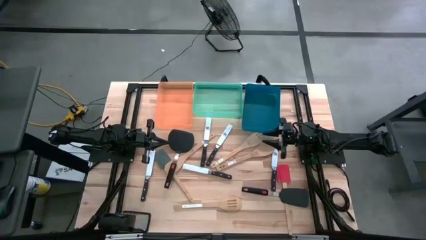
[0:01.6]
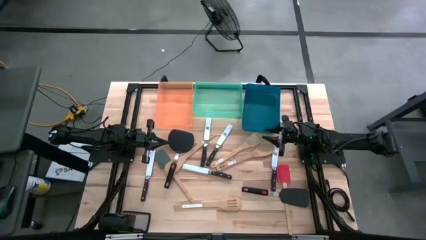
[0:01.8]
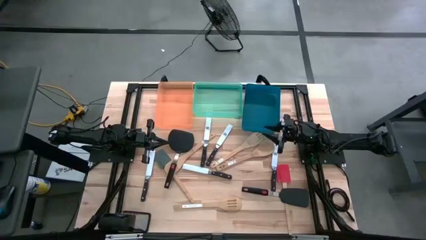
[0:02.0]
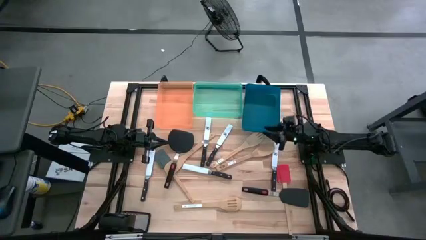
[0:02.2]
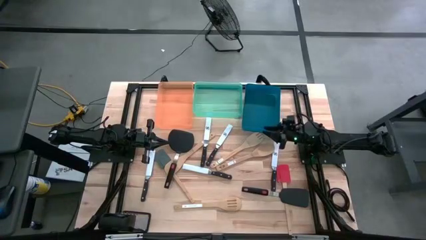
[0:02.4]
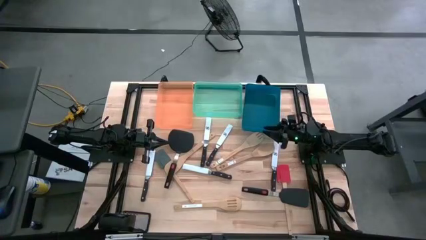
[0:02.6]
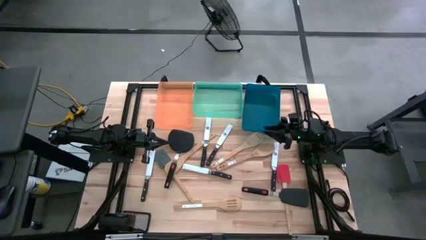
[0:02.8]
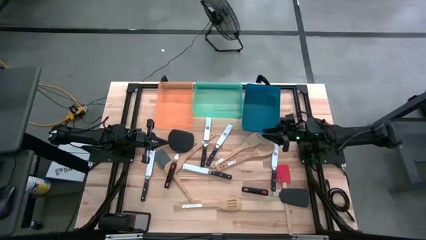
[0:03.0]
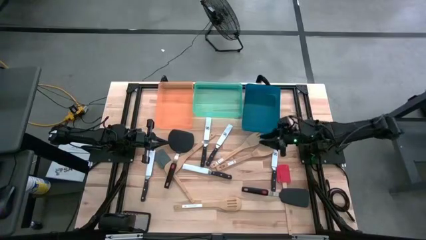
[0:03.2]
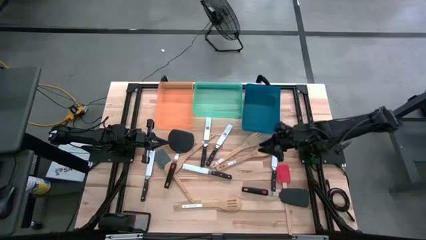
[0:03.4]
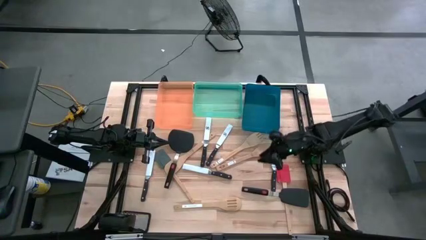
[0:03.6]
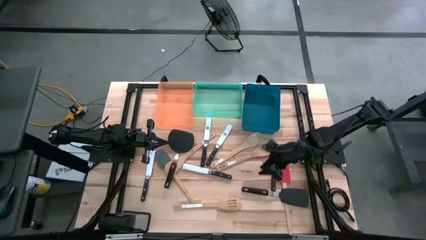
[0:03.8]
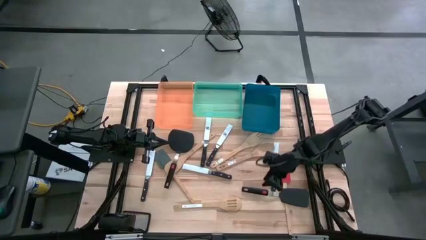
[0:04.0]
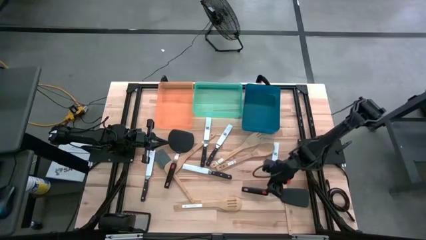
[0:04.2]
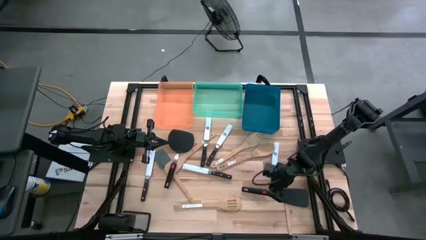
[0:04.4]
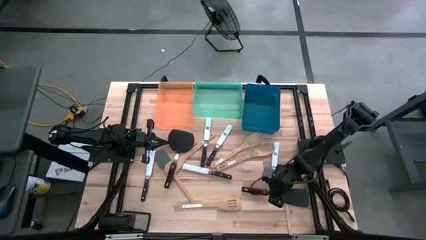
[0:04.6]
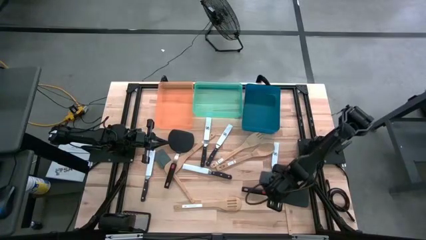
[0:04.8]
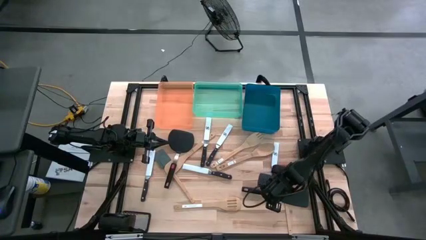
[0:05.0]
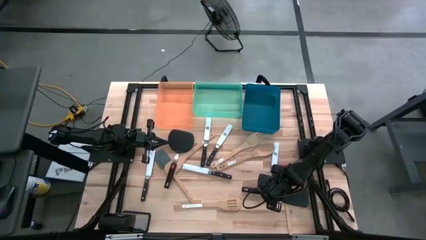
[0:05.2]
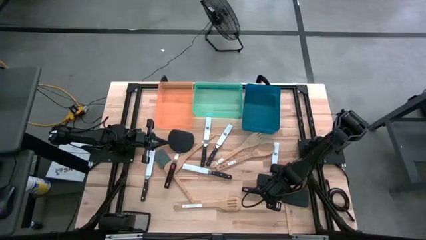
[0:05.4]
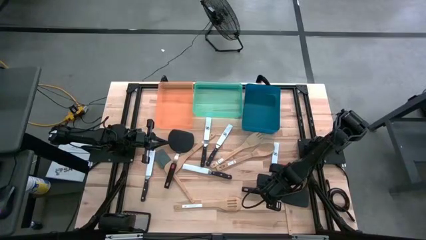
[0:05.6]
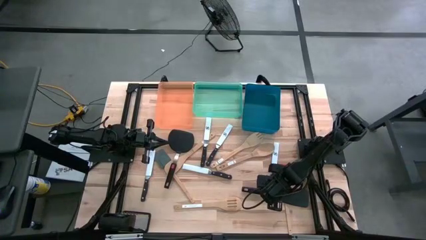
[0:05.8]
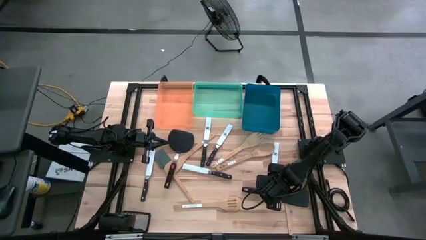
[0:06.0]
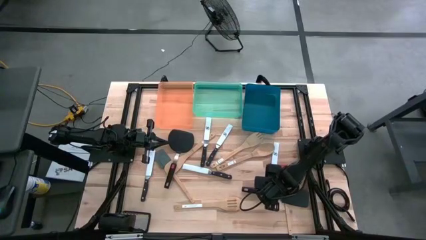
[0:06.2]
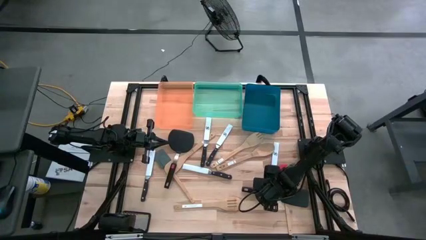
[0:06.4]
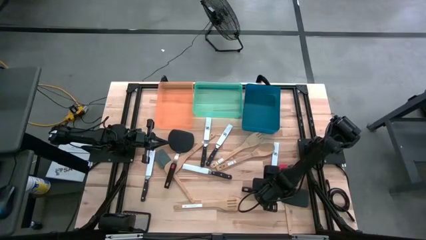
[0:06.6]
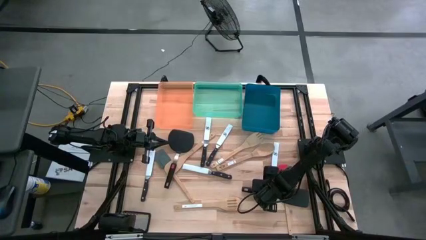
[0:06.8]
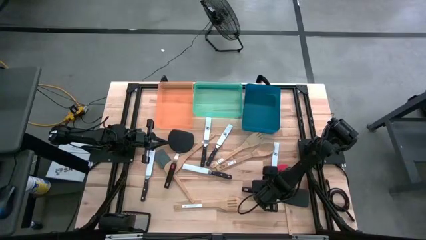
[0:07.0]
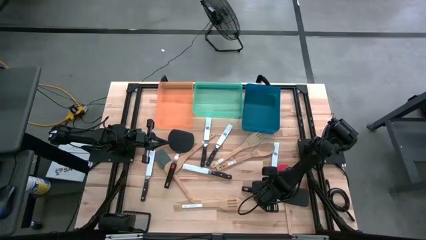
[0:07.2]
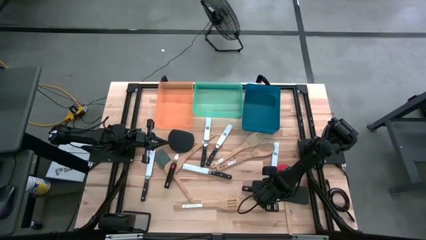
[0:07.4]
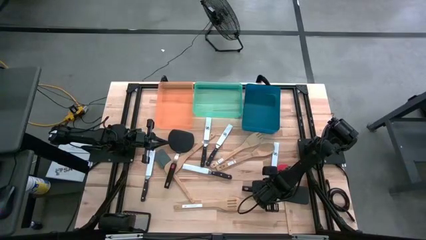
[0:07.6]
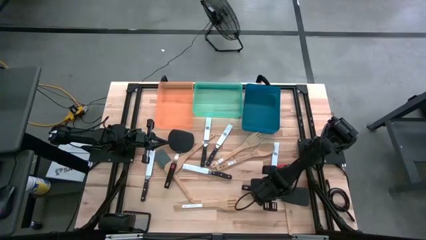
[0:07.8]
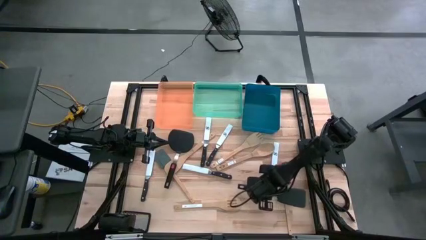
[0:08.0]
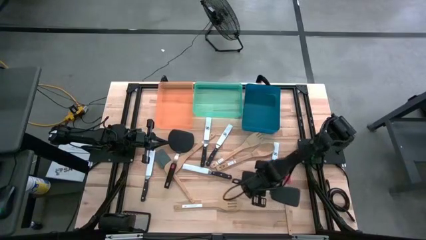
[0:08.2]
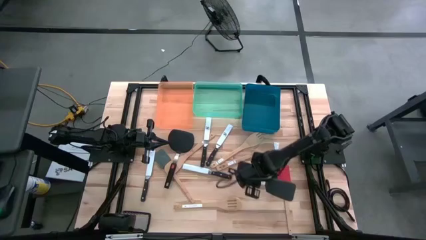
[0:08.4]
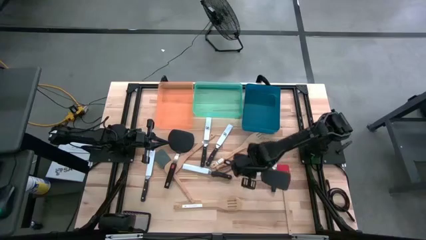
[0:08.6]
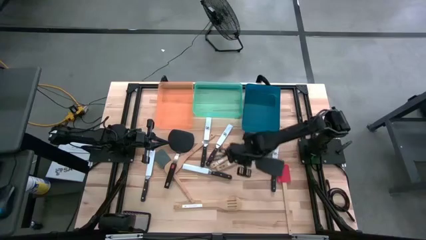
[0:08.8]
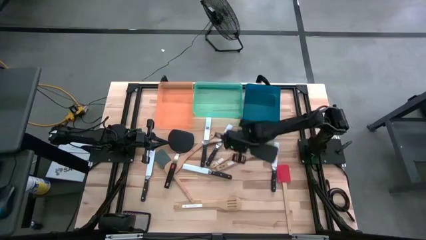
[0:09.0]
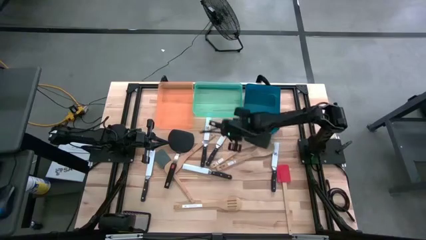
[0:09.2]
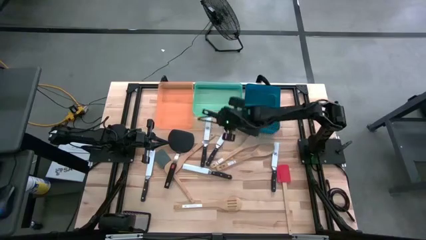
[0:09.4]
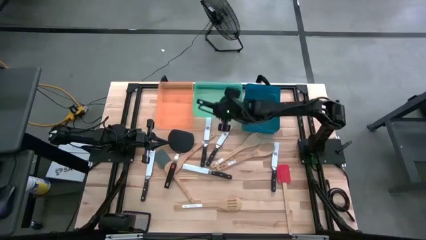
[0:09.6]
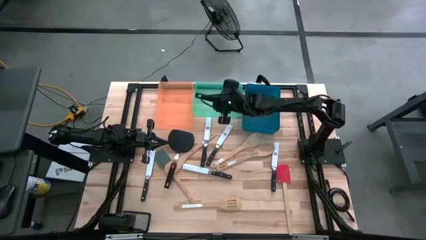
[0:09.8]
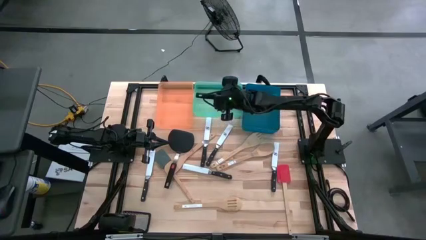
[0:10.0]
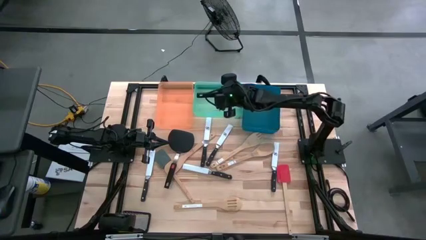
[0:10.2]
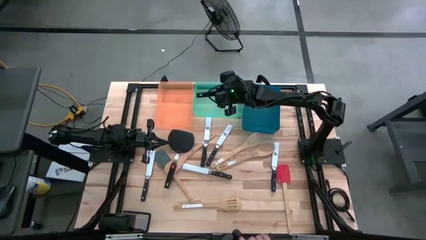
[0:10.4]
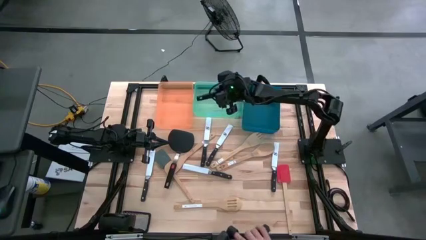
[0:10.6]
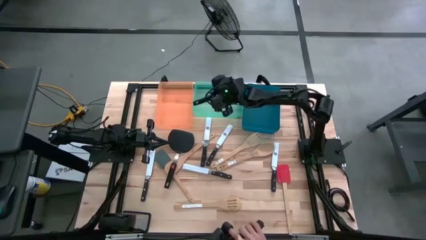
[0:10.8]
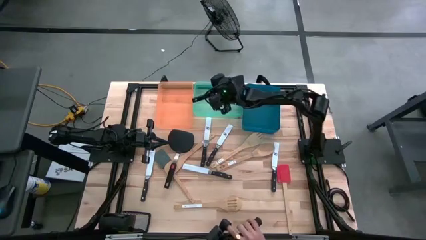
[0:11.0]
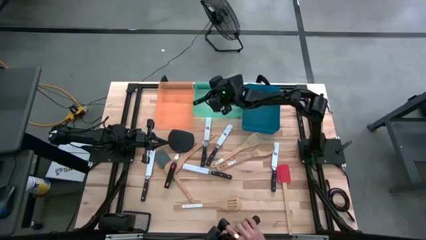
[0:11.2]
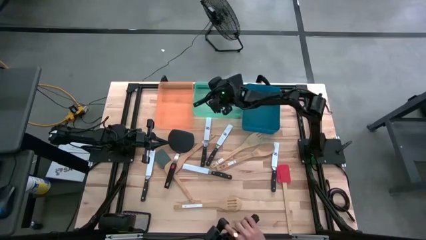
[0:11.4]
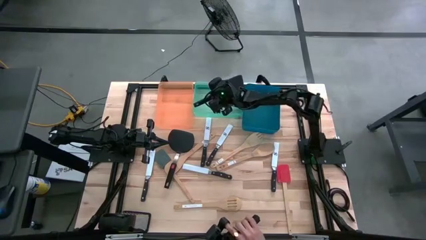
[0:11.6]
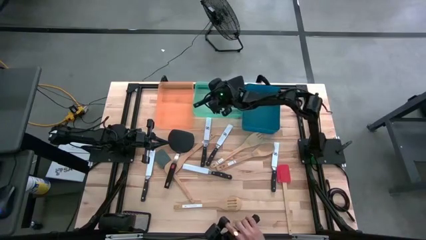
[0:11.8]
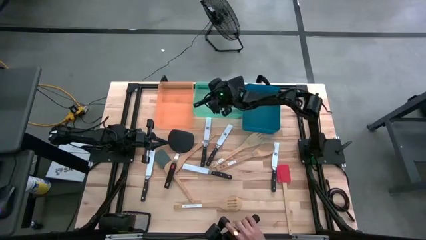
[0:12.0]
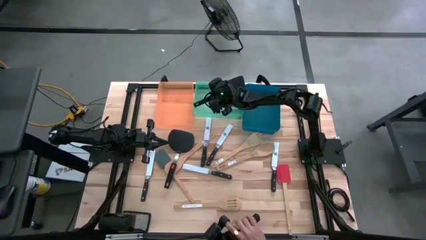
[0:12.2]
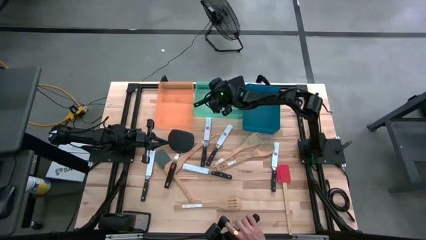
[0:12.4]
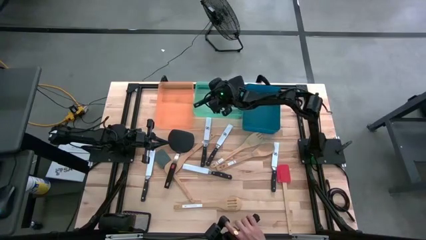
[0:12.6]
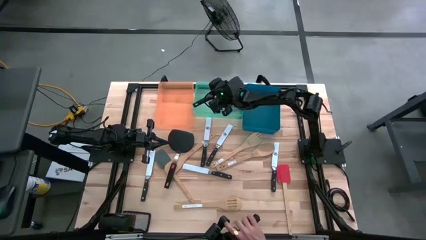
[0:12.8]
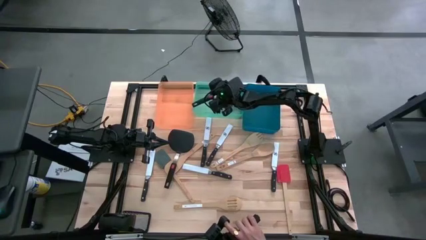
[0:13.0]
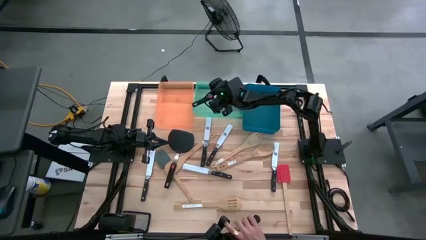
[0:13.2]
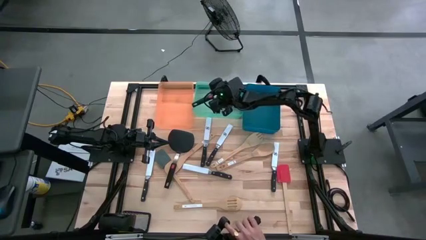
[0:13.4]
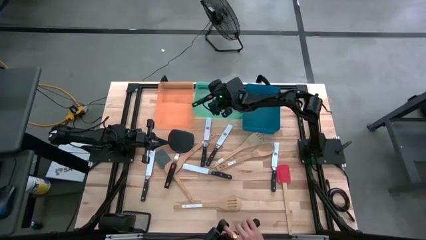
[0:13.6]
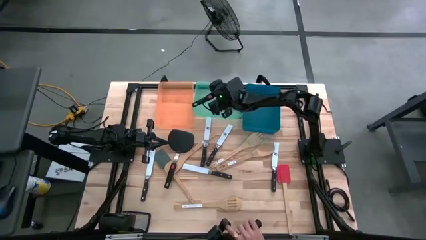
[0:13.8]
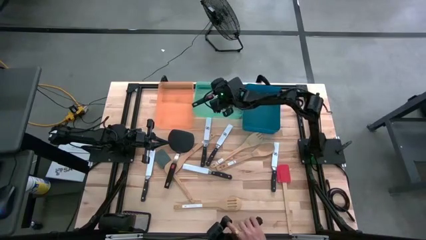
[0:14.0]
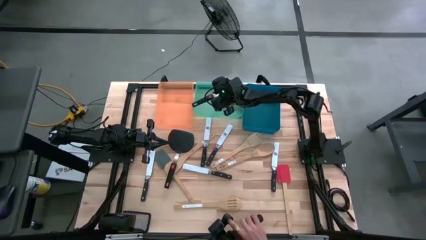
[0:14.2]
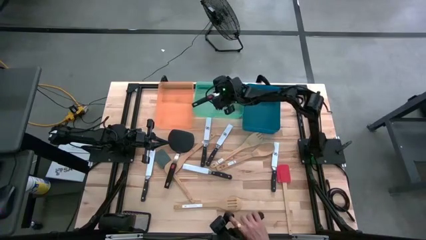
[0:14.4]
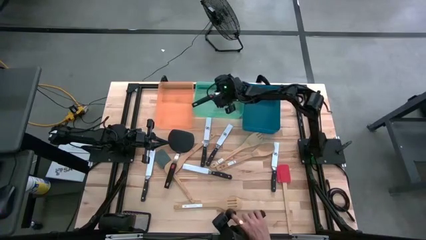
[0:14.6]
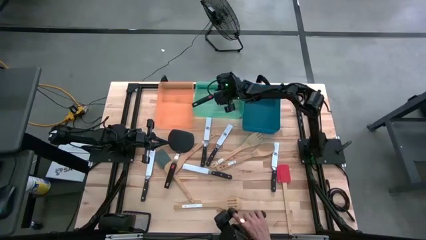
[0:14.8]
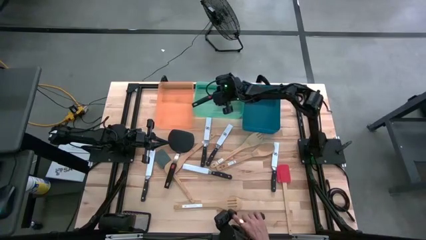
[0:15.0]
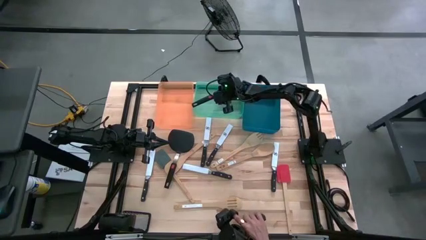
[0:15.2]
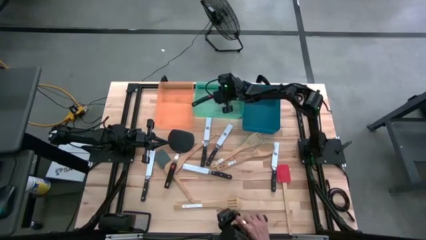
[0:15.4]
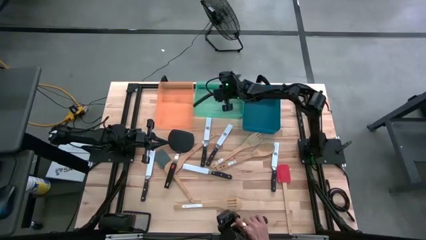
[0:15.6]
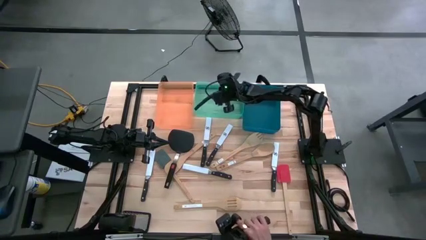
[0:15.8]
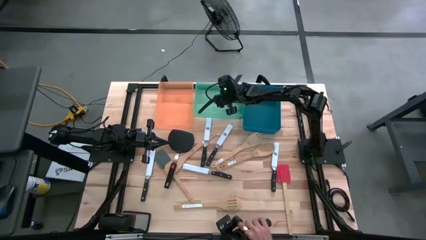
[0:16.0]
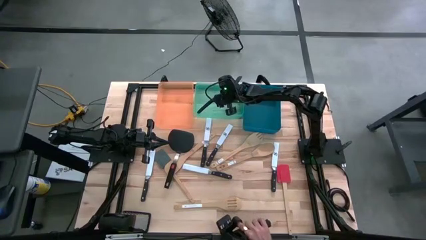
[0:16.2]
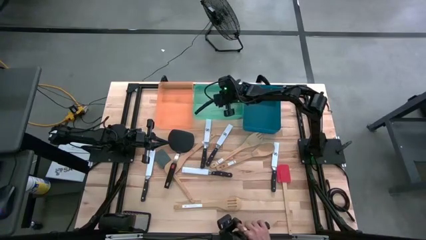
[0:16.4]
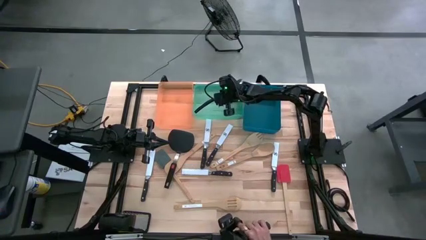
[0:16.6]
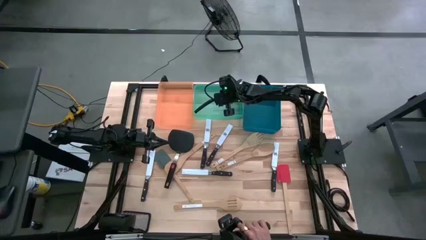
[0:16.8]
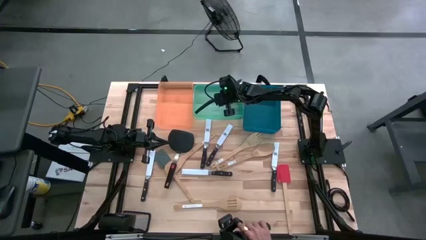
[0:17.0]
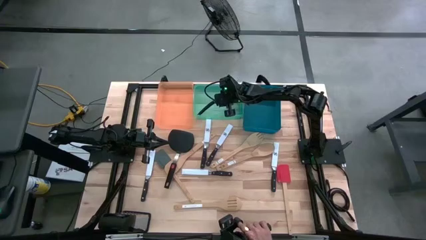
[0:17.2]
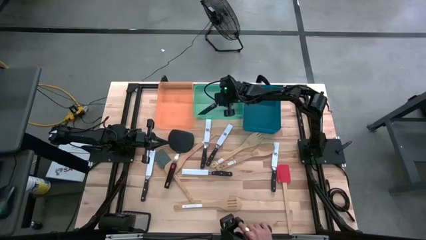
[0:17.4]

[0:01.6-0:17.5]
Task: Pick & Place Kitchen Items
Put the right black spatula into the green bin
